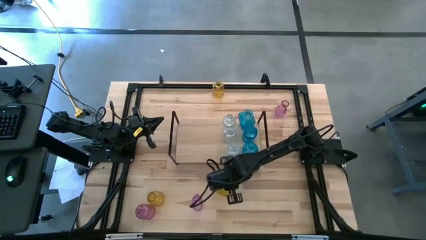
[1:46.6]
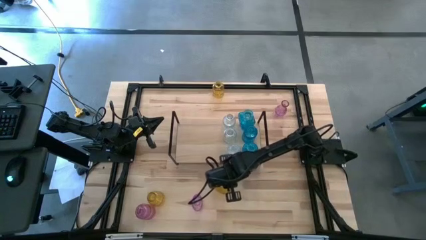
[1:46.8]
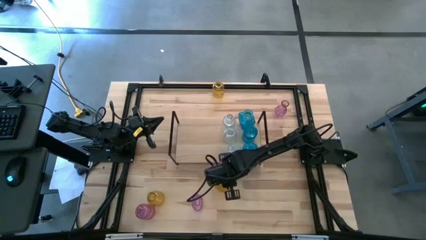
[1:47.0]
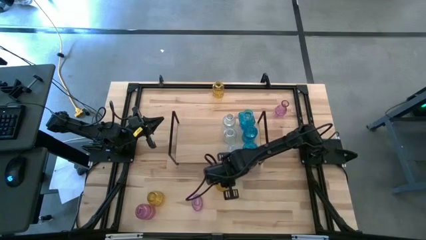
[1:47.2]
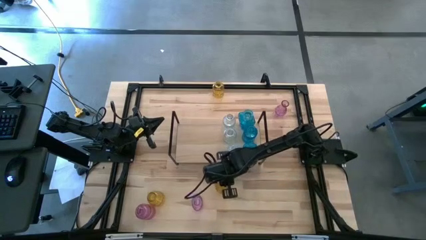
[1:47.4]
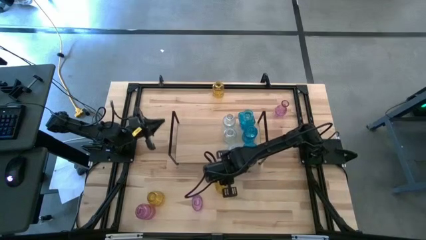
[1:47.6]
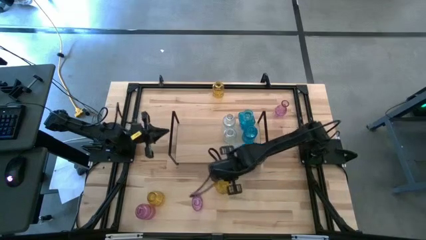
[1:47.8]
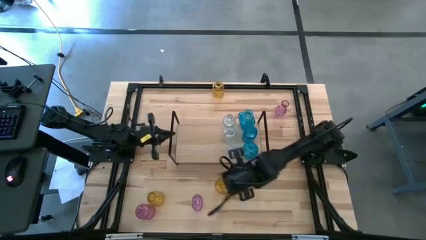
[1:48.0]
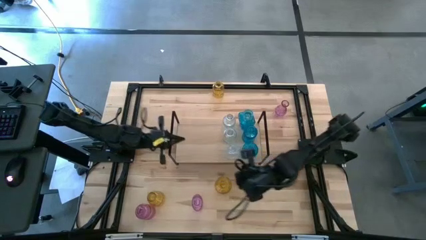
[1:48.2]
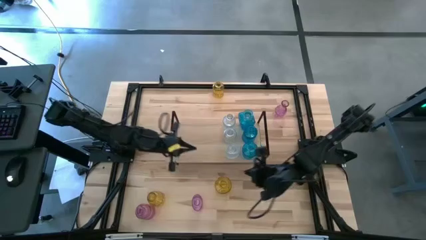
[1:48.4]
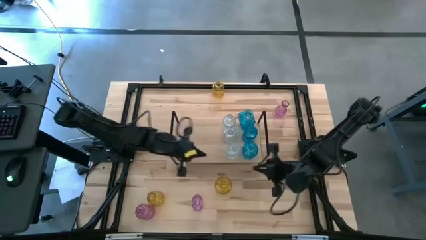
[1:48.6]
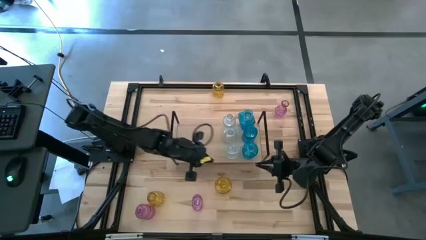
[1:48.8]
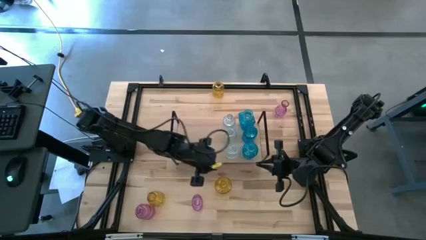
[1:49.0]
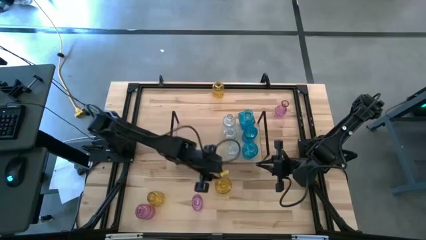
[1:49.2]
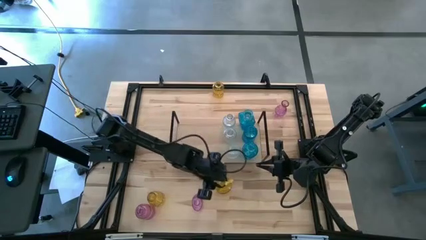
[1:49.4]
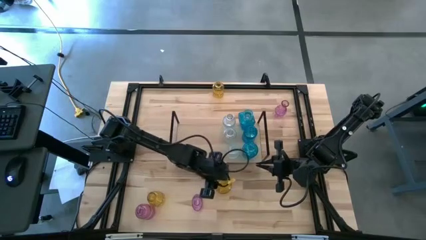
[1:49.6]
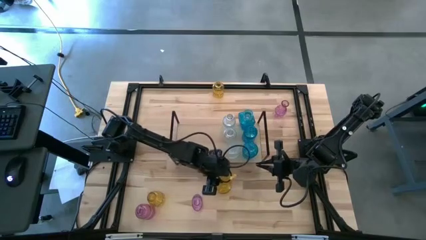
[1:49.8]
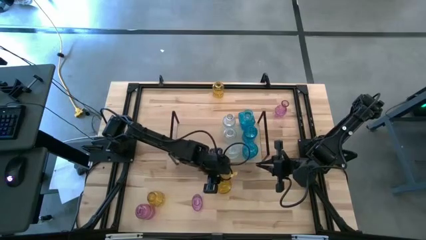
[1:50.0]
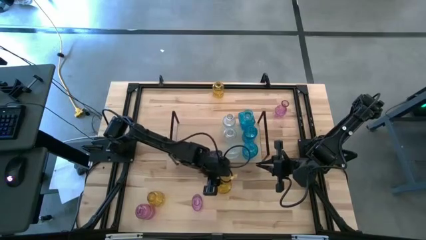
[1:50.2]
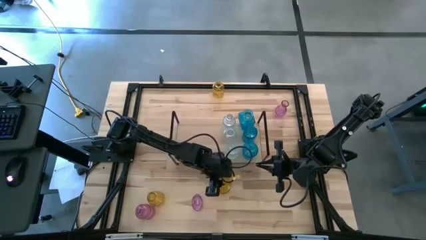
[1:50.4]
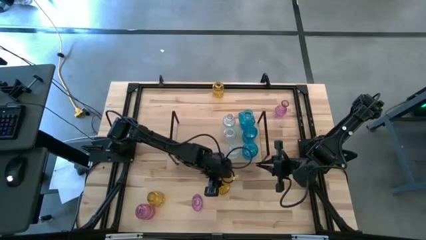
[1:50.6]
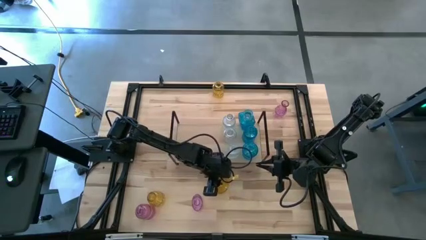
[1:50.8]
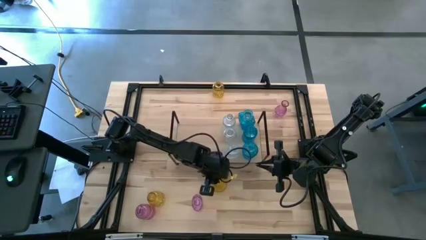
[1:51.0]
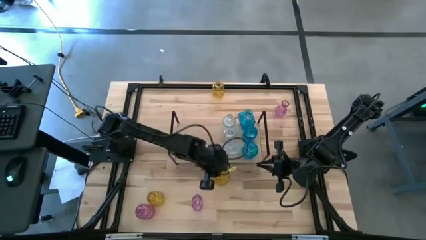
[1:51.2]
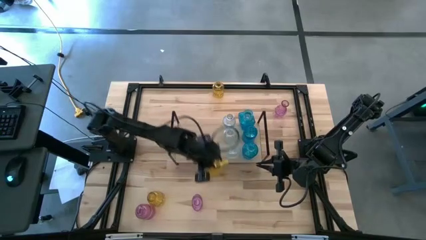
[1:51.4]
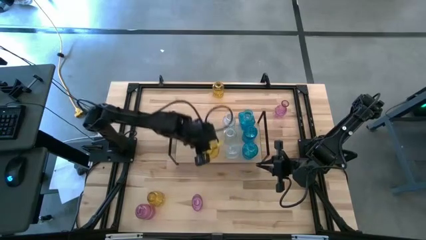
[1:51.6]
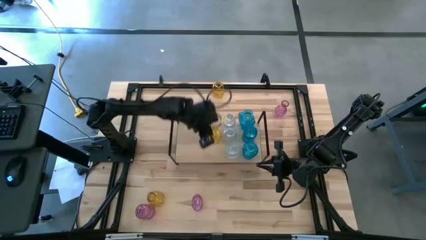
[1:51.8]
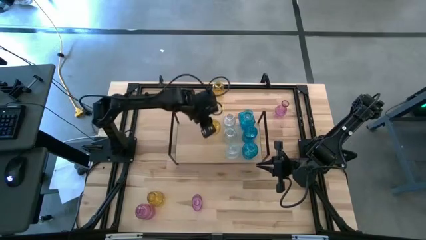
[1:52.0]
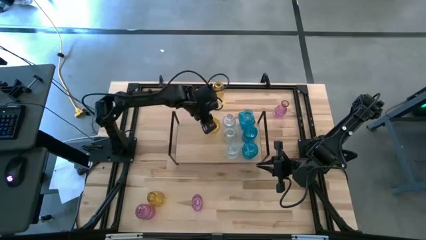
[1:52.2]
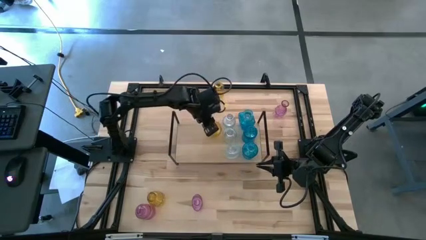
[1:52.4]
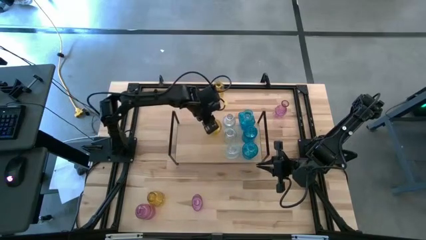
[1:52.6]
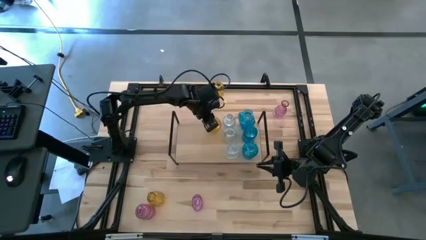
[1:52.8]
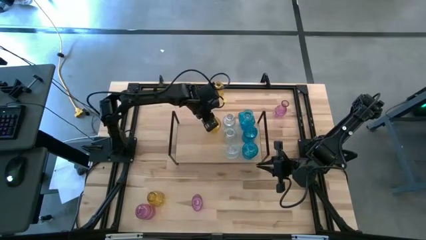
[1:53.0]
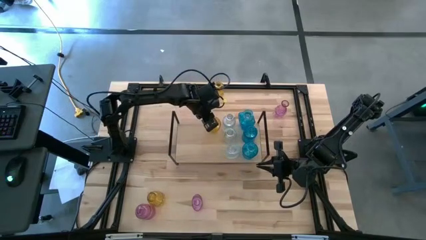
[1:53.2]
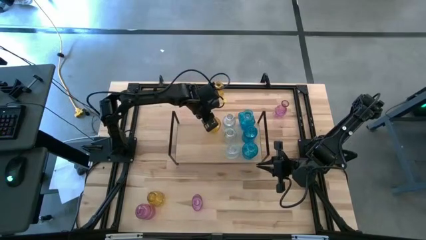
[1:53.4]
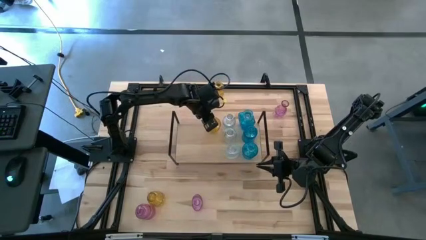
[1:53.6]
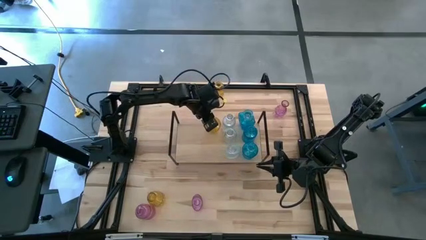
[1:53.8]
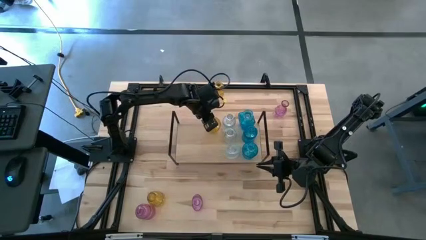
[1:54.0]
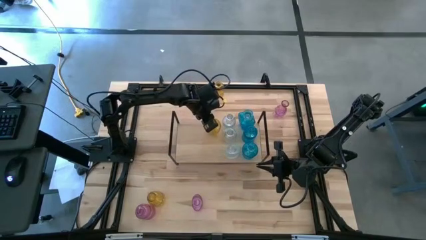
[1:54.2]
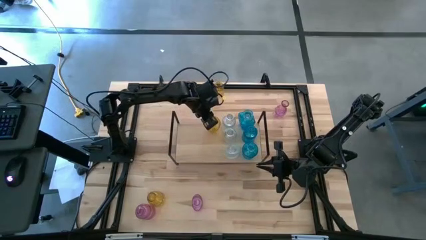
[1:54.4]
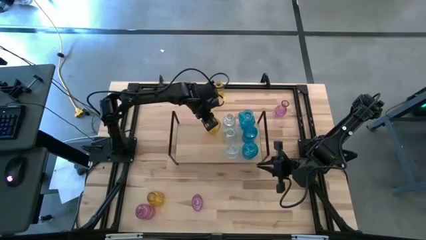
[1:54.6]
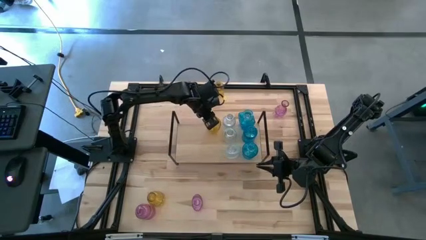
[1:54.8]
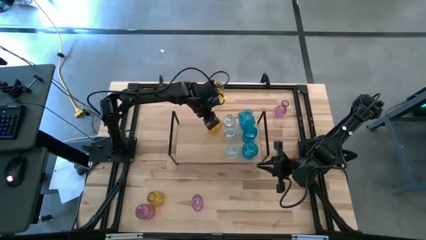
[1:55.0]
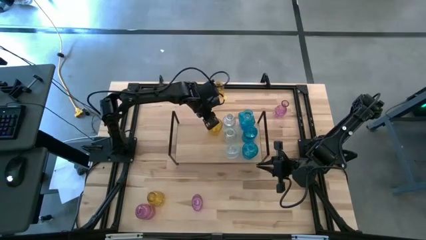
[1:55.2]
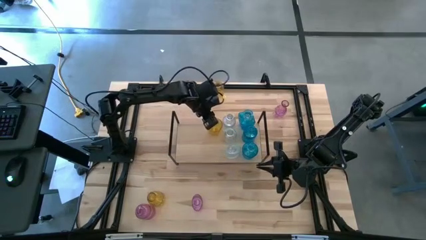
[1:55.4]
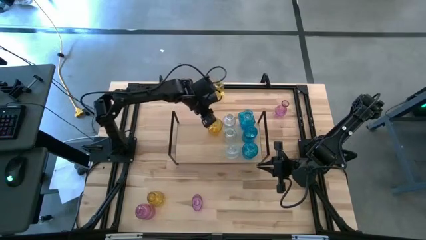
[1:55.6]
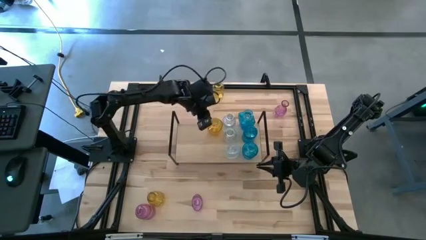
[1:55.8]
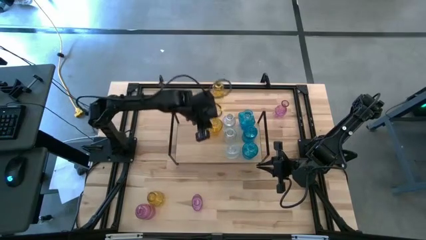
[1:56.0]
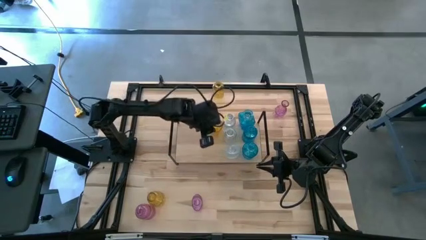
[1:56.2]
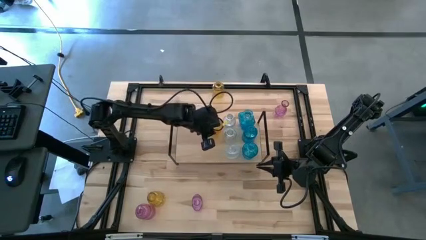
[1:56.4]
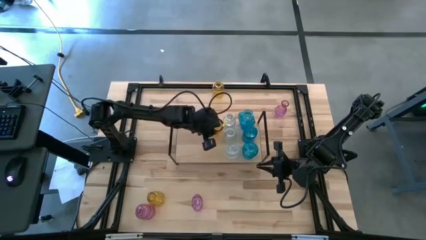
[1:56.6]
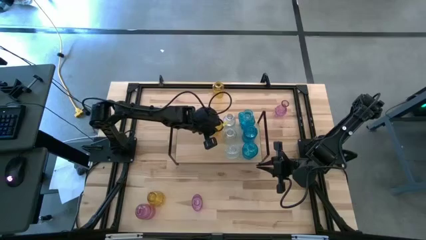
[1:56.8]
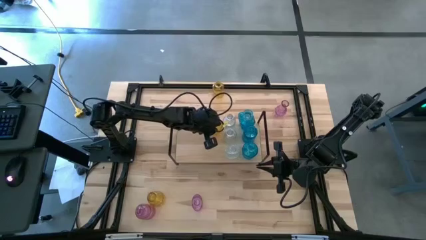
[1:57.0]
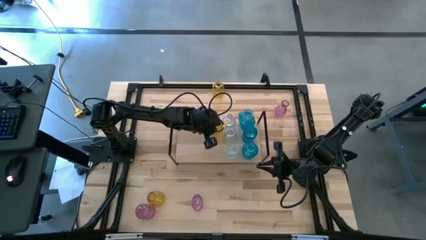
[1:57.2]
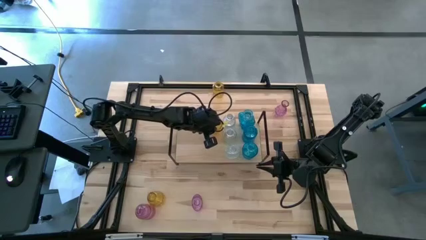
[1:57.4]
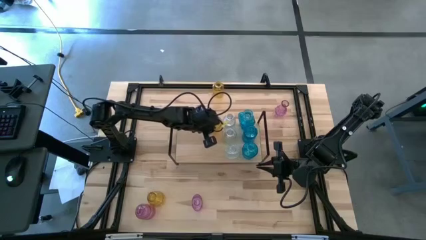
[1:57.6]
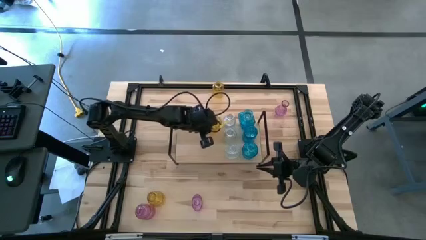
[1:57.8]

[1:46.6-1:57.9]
Task: sort vases onto shelf
Put the bottom right yellow vase on the shelf

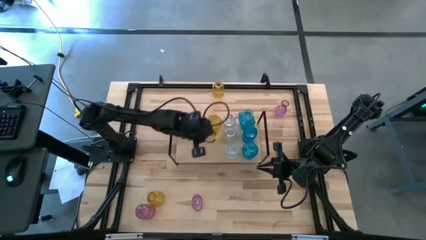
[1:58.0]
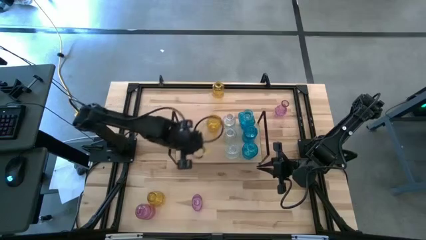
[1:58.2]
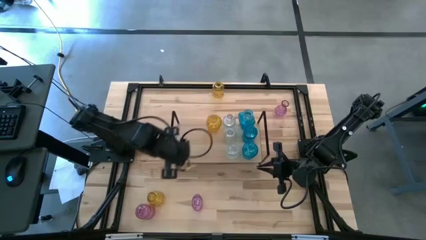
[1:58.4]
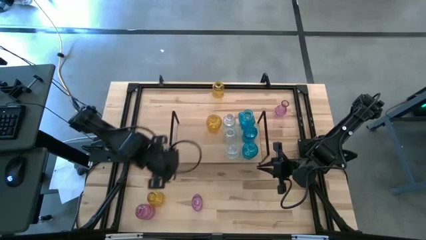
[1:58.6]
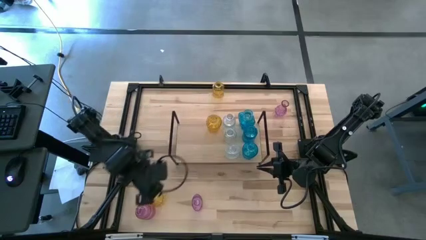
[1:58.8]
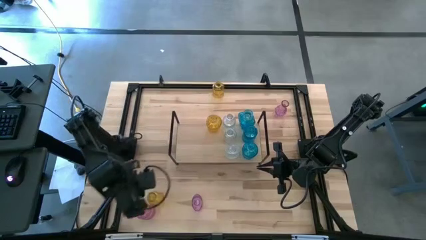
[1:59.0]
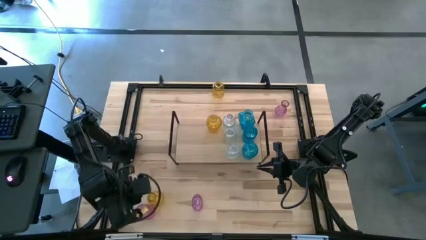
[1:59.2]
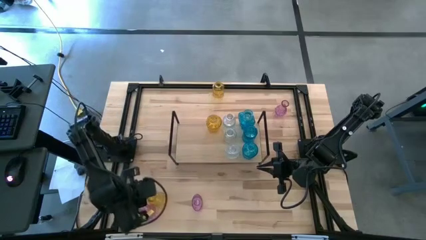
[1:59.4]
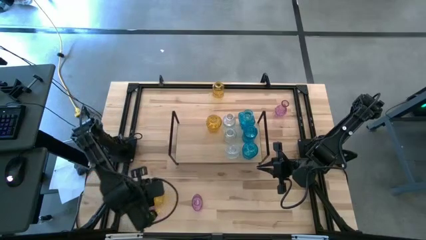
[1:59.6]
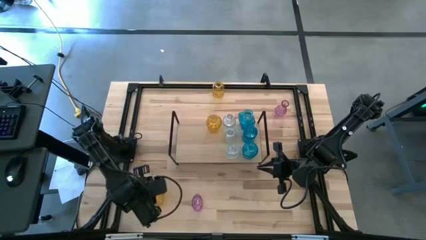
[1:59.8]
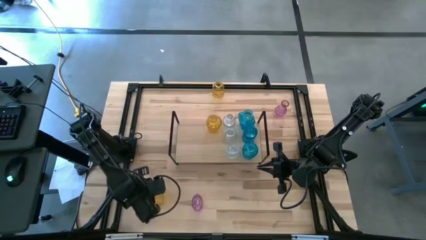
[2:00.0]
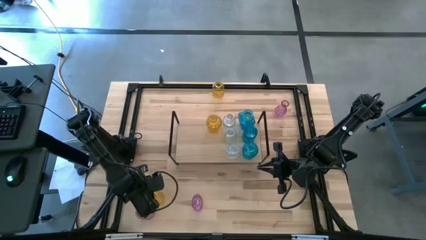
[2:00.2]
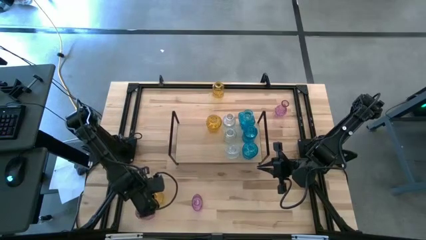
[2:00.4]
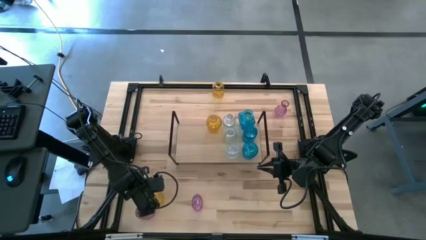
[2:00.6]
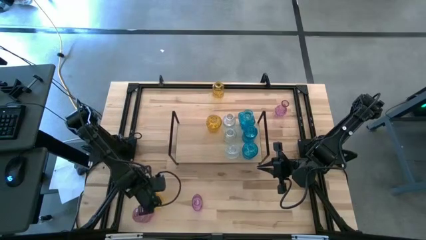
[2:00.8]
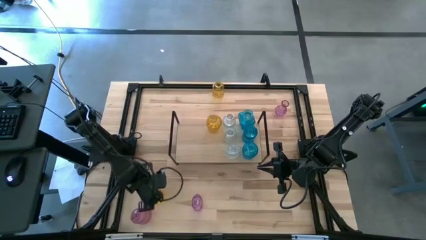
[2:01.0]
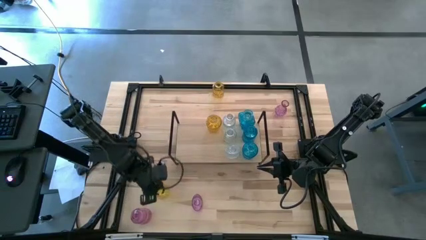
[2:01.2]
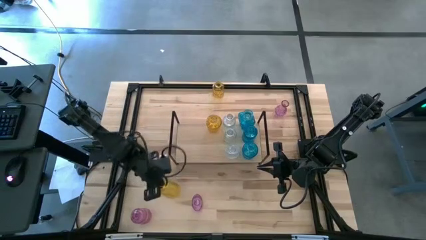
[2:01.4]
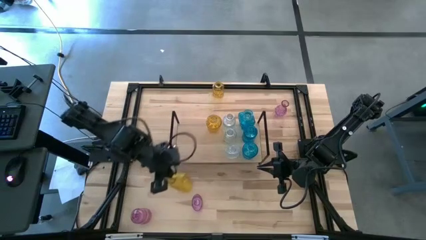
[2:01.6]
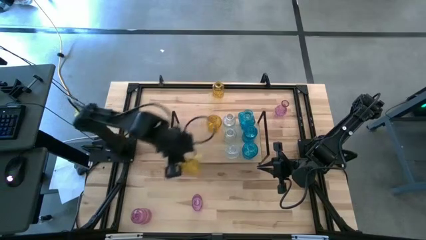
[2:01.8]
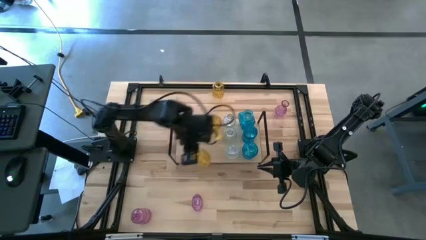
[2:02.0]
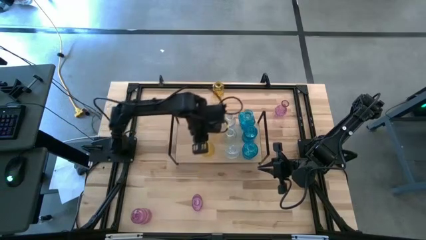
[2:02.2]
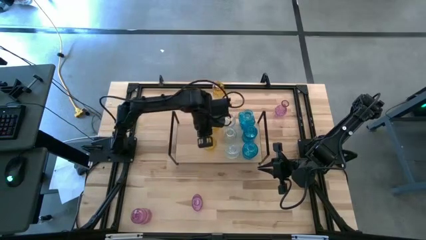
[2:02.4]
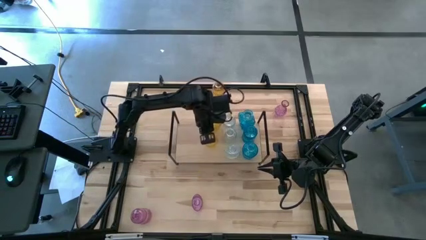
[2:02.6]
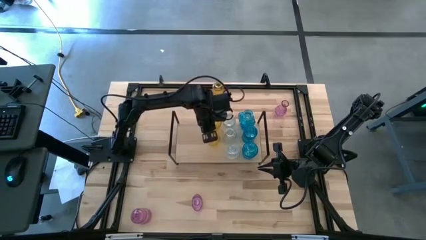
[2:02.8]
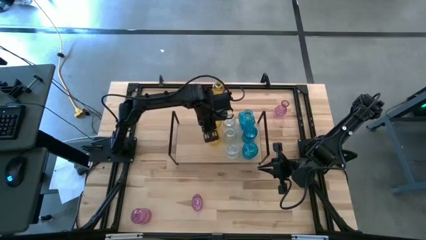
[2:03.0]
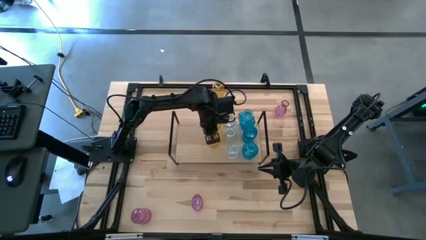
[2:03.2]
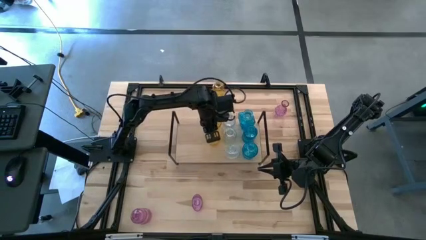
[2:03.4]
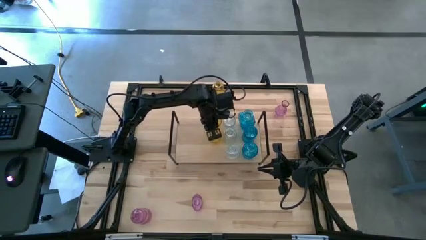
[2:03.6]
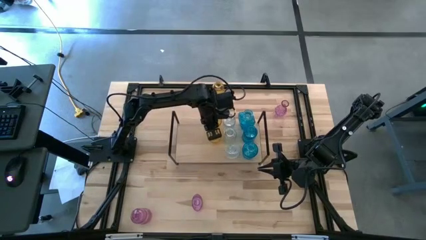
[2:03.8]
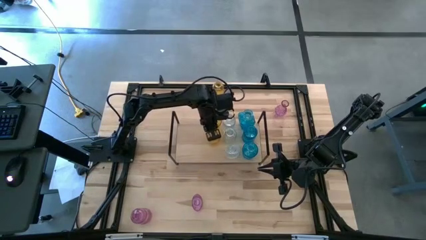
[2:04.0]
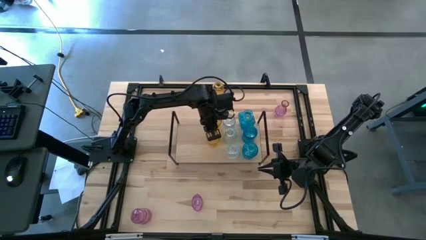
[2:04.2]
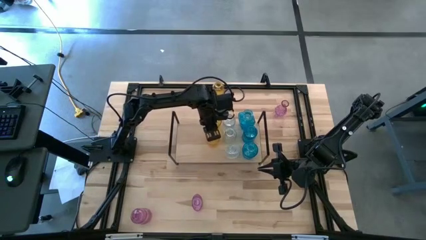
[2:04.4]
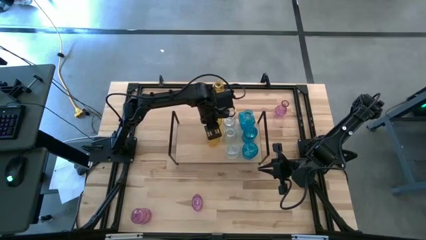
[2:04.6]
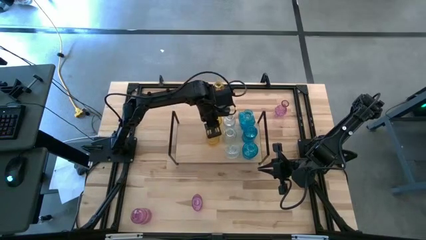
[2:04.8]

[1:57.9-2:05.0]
Put the bottom yellow vase aligned with the other yellow vase on the shelf
